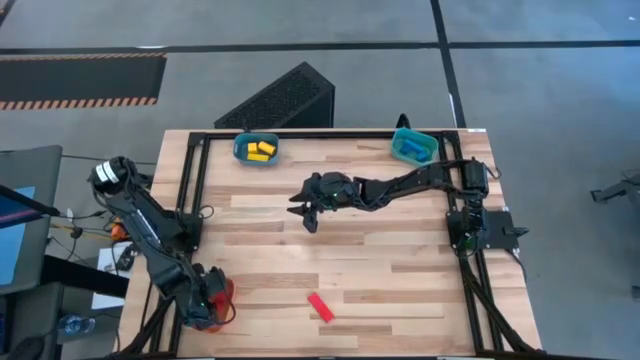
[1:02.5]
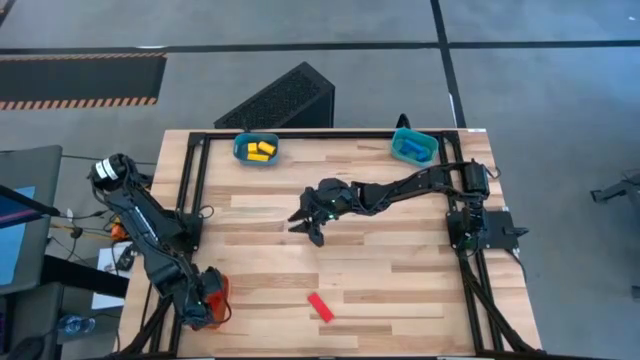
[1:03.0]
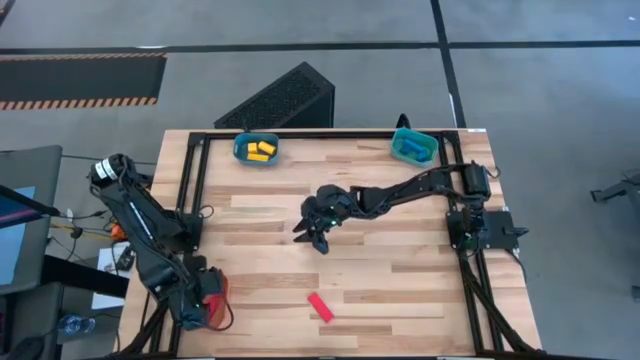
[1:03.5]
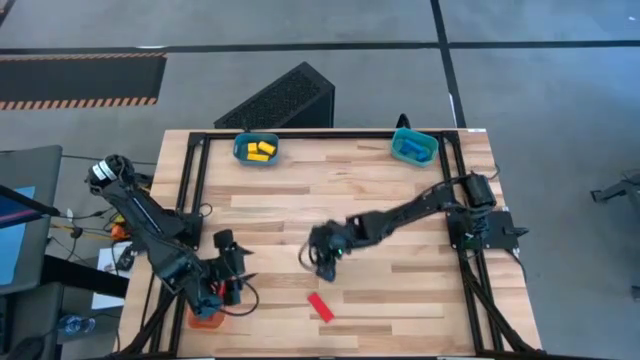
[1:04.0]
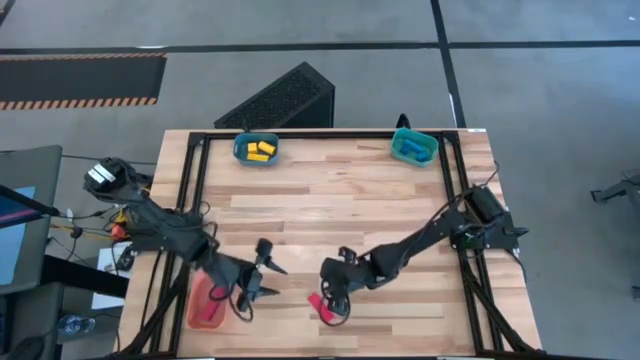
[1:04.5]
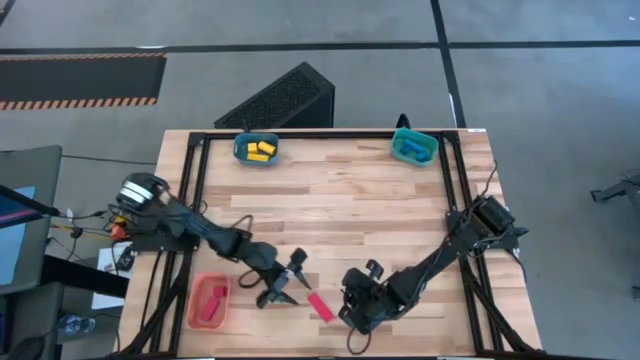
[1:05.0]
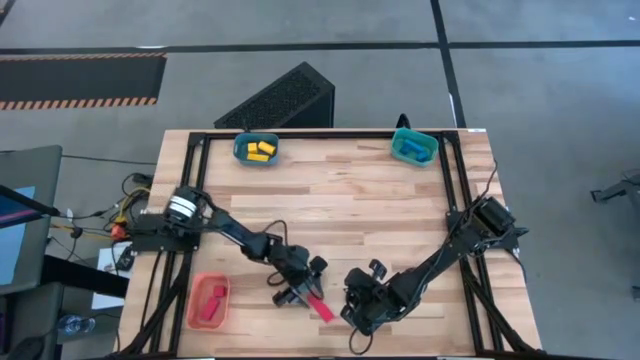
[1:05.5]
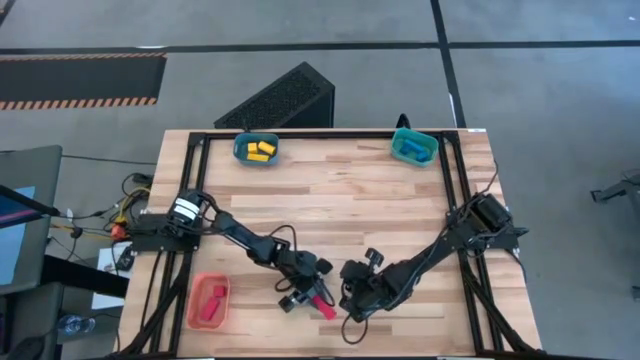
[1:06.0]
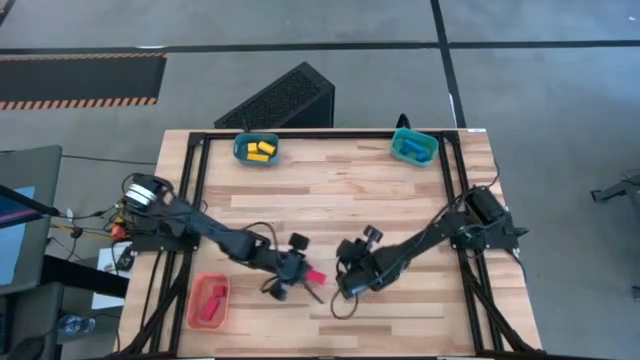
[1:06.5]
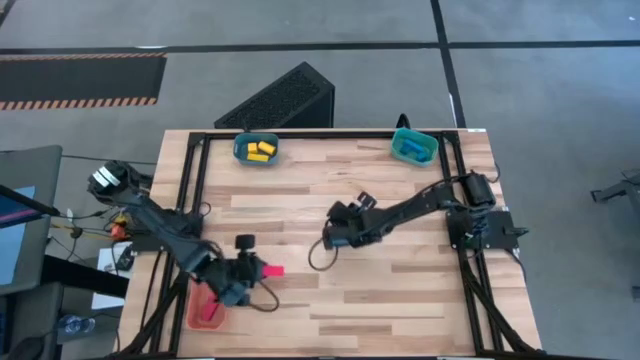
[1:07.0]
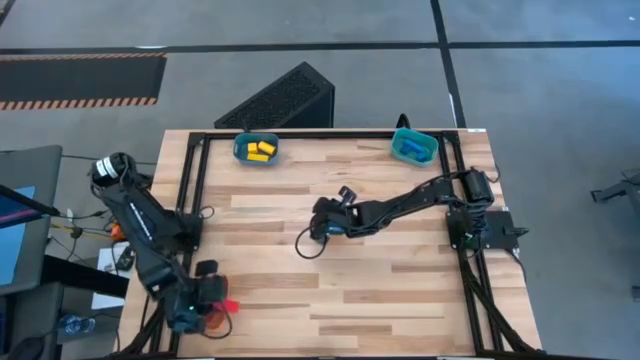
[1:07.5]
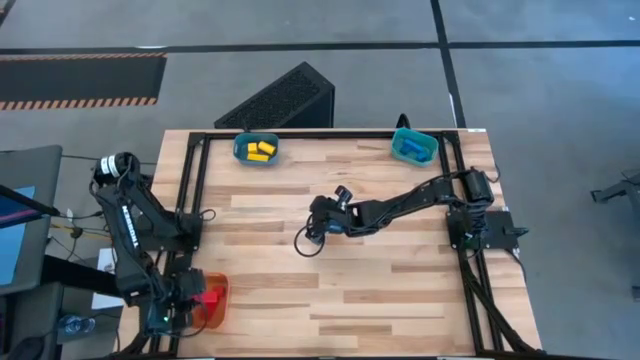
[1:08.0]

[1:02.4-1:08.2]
Task: Sort & place blocks by color
Put the red block into the orange bin

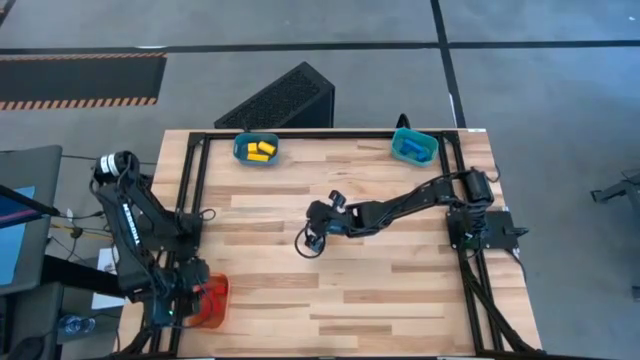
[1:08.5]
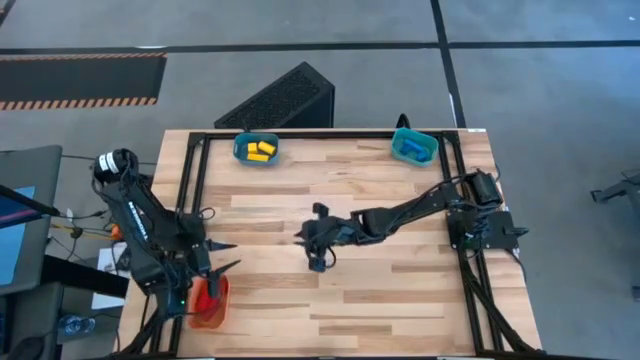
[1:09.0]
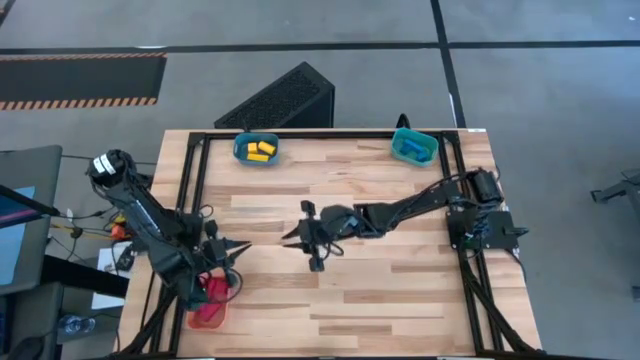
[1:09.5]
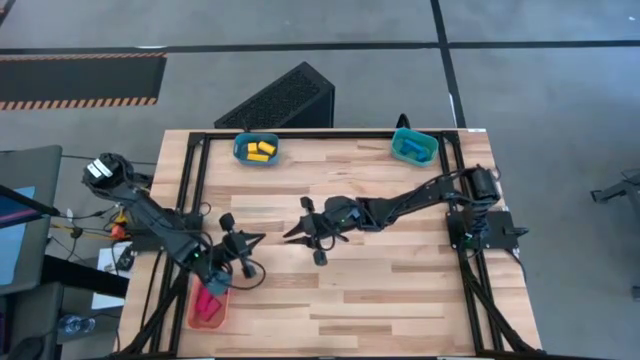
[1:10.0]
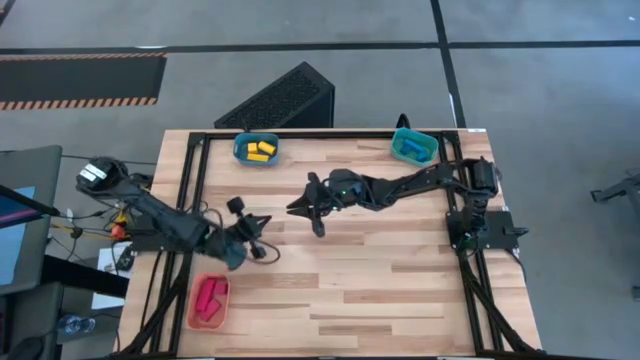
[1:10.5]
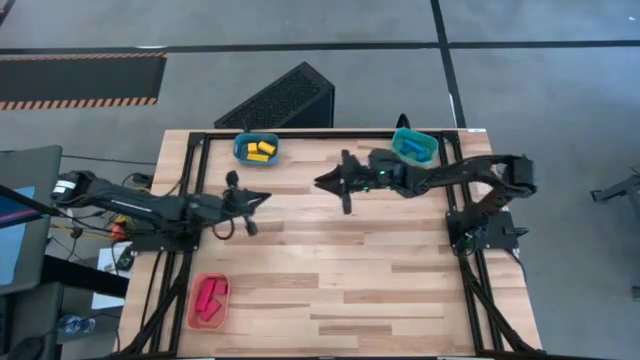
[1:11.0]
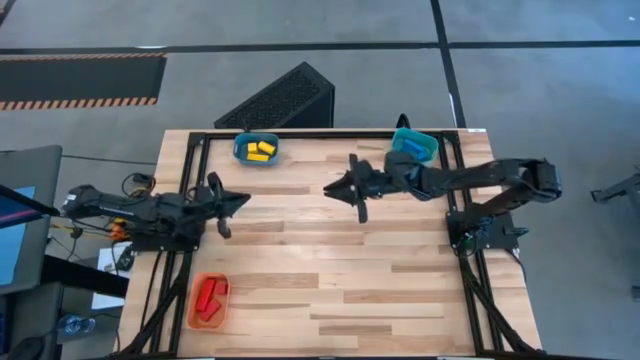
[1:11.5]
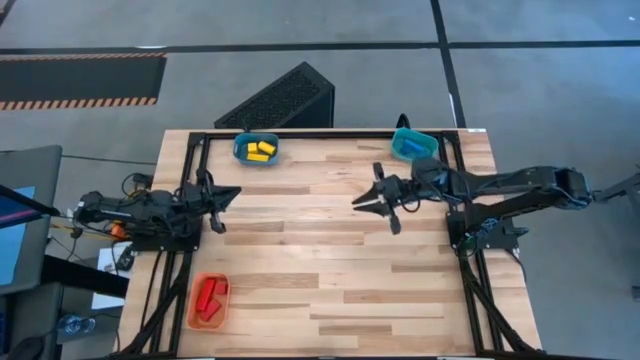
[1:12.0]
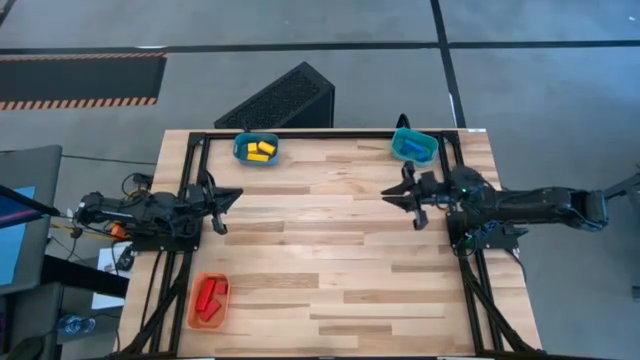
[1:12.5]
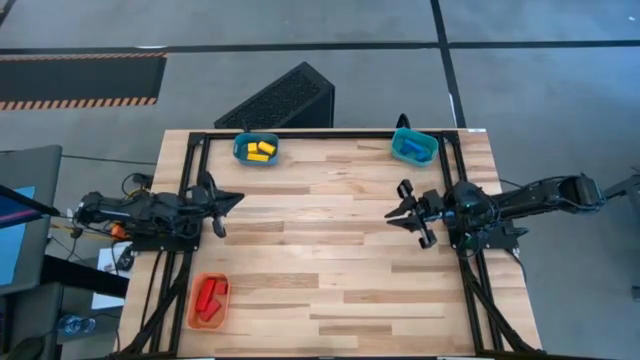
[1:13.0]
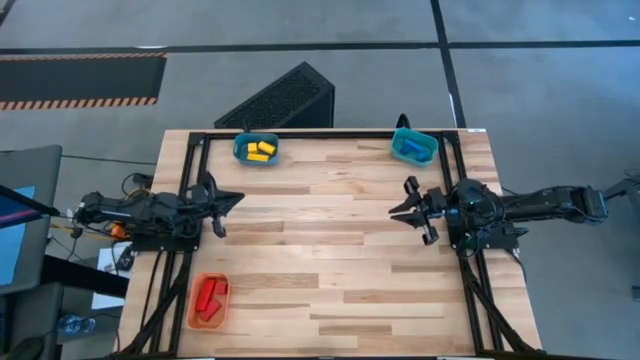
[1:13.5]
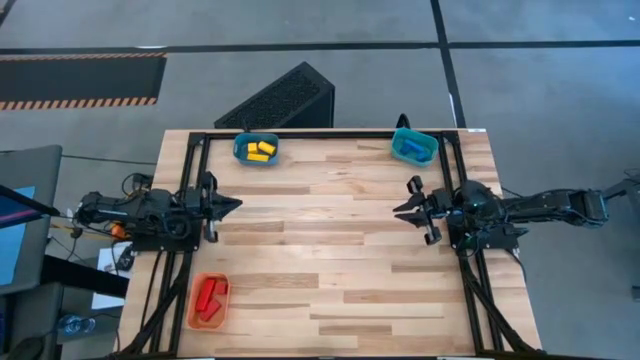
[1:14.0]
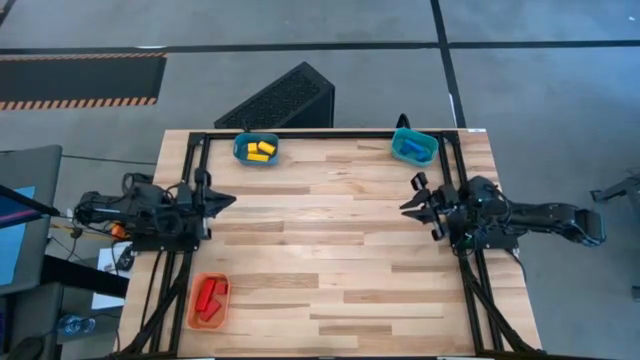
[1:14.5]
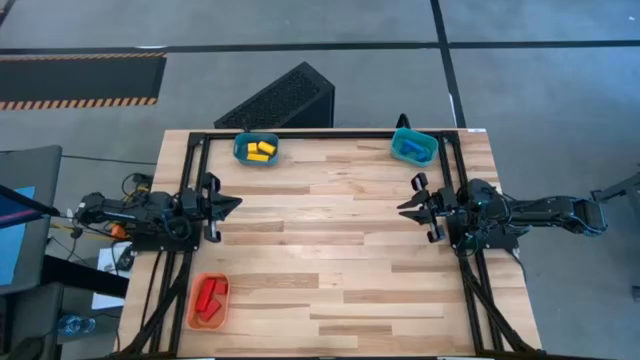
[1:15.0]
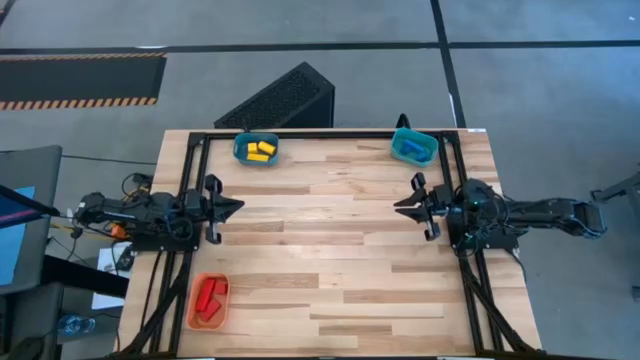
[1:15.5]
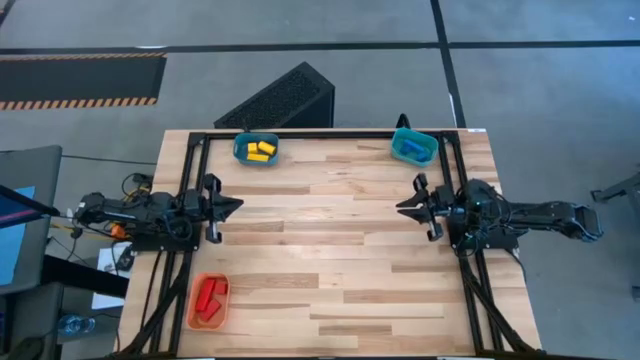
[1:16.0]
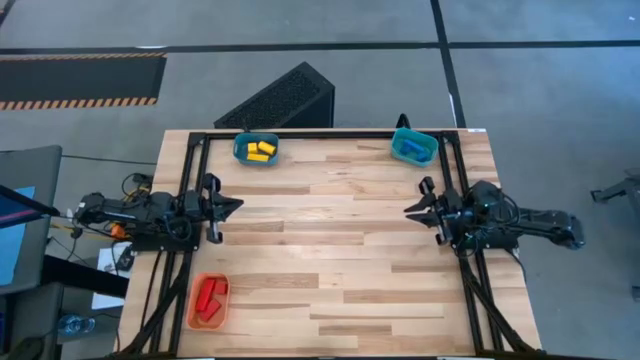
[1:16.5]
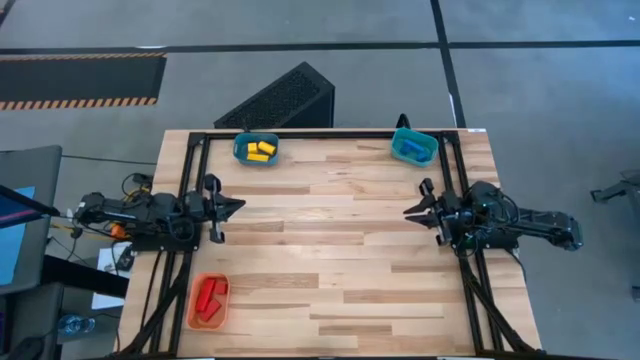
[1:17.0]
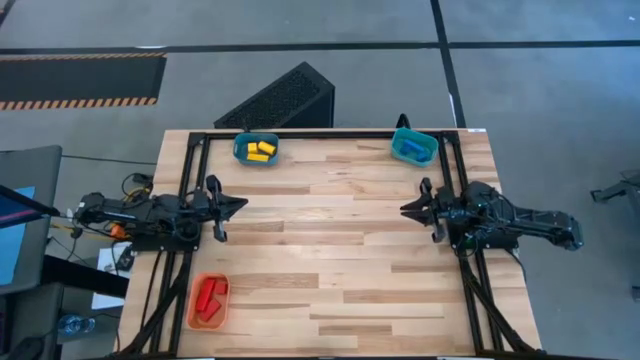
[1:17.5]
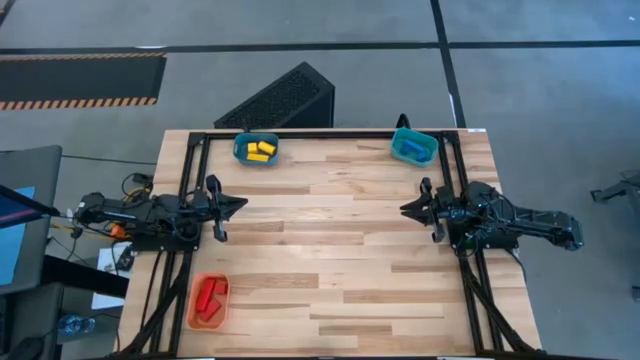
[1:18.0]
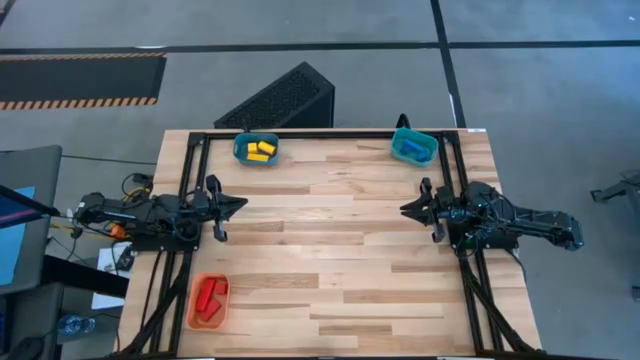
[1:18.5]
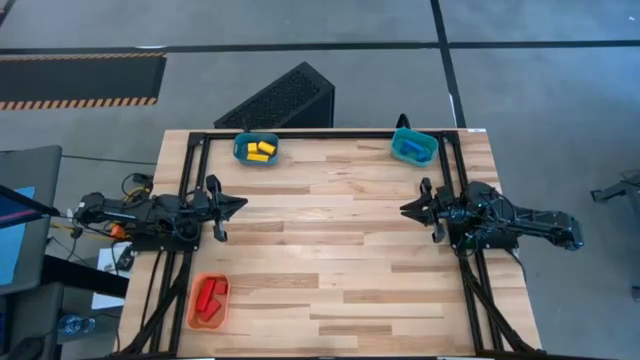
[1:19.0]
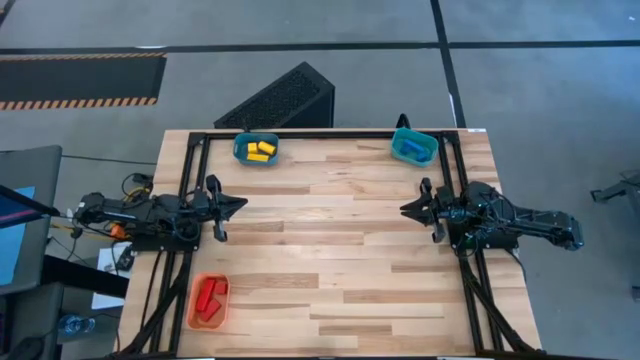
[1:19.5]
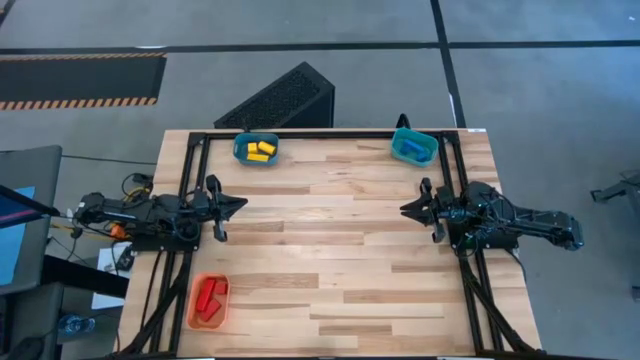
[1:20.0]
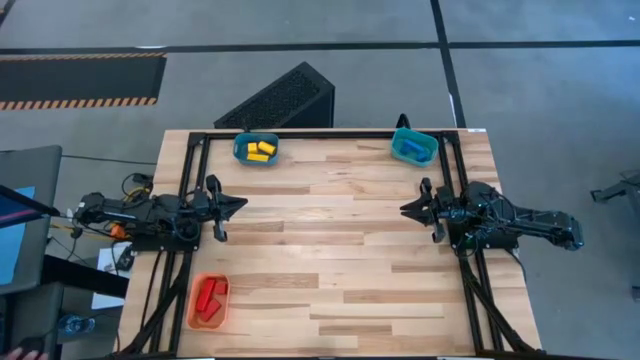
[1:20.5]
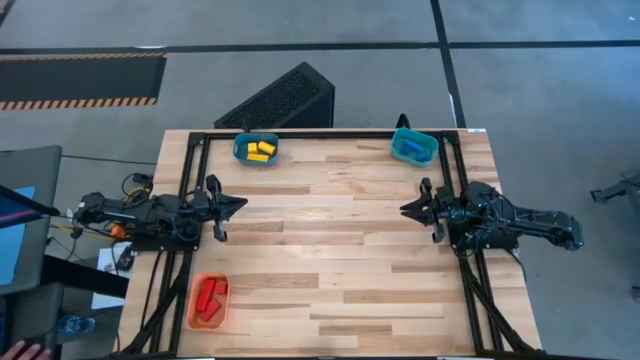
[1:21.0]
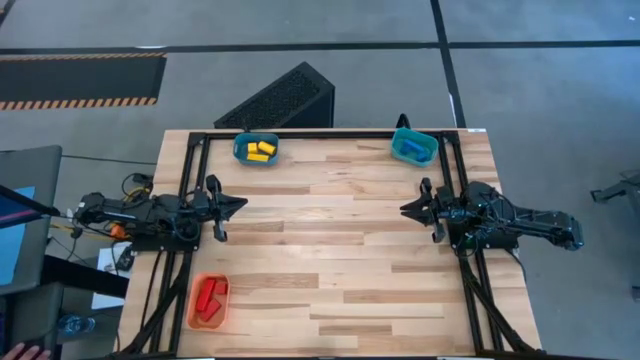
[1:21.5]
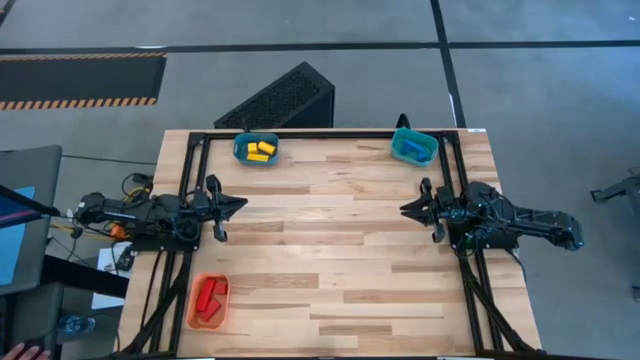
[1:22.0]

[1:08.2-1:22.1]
Return to Home Position

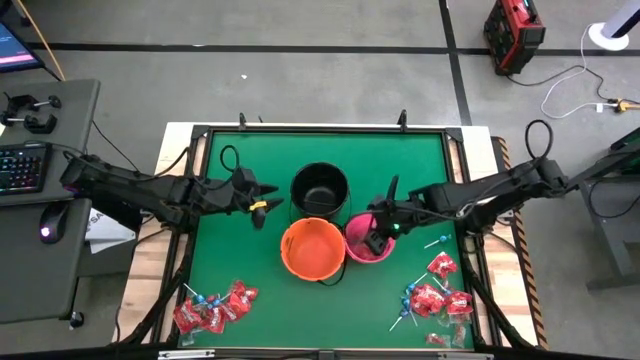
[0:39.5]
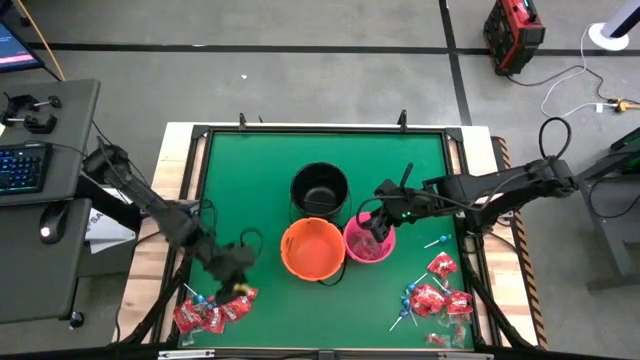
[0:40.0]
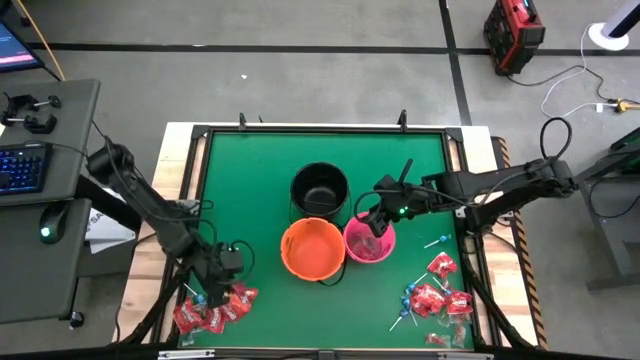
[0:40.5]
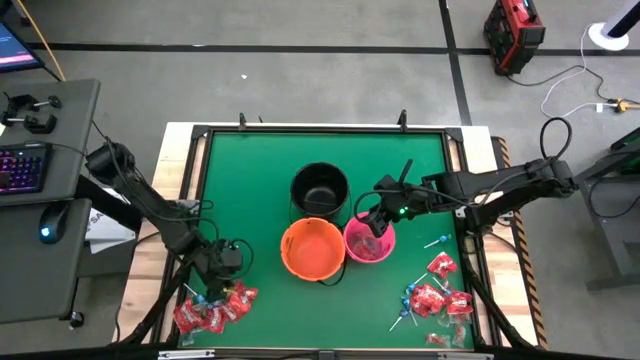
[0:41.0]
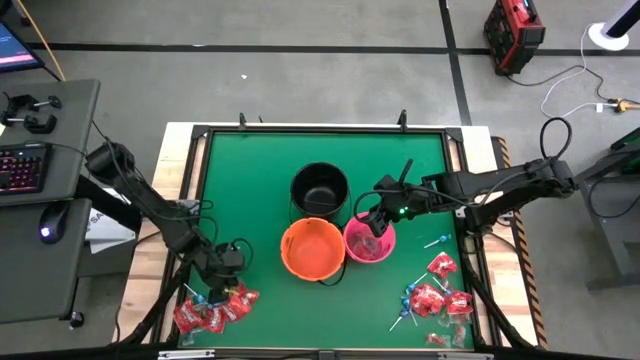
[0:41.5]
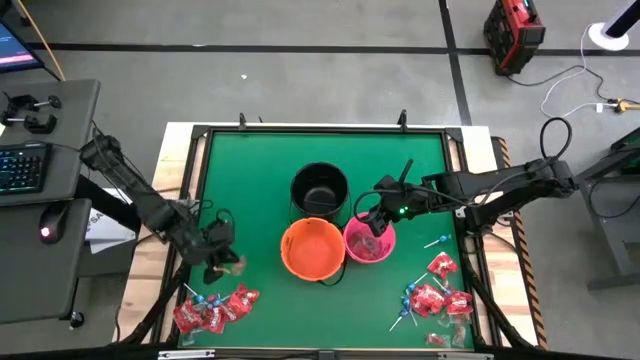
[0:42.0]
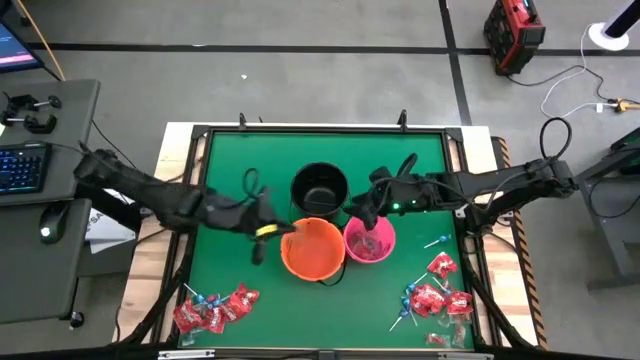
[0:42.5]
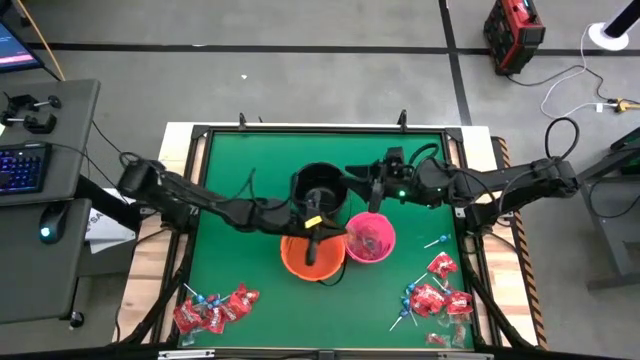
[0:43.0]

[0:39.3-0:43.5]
Task: Sort candy by brand, put in halloween buckets
Put the orange gummy into the pink bucket
